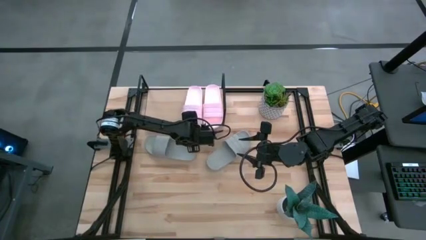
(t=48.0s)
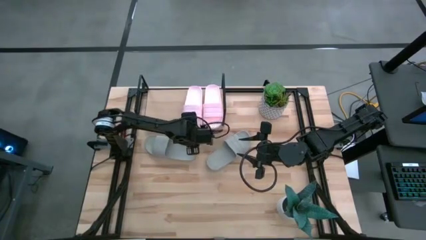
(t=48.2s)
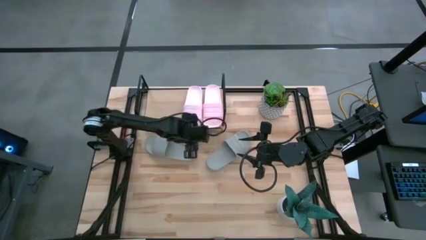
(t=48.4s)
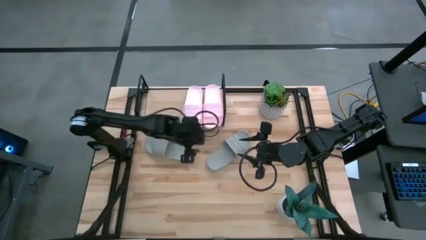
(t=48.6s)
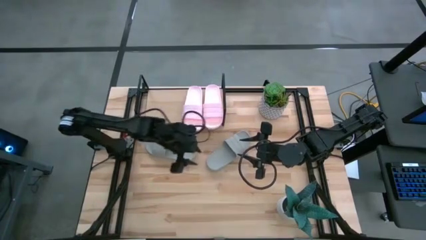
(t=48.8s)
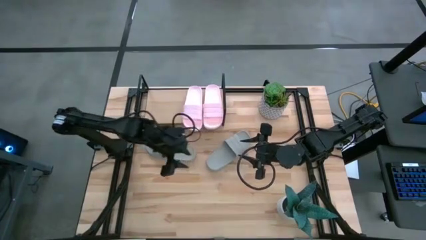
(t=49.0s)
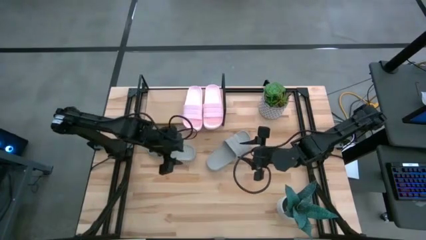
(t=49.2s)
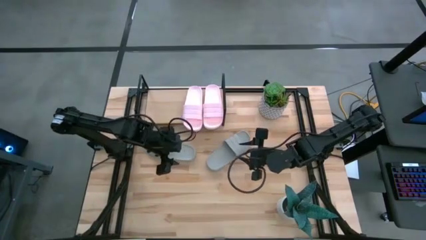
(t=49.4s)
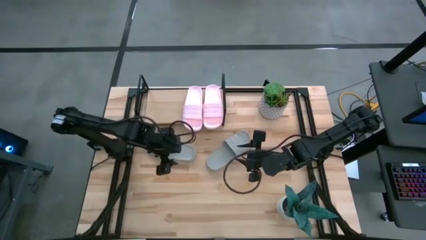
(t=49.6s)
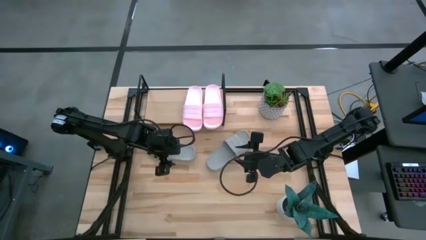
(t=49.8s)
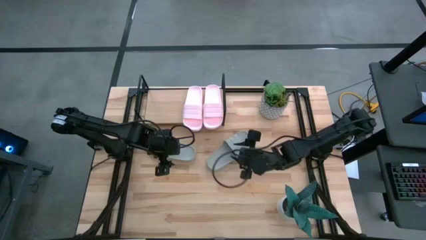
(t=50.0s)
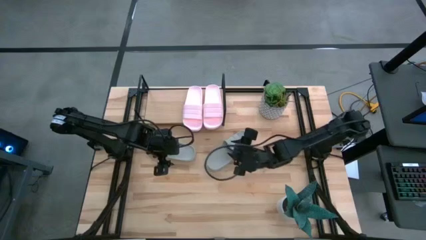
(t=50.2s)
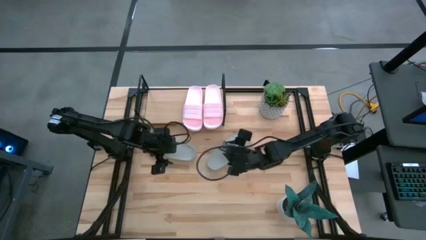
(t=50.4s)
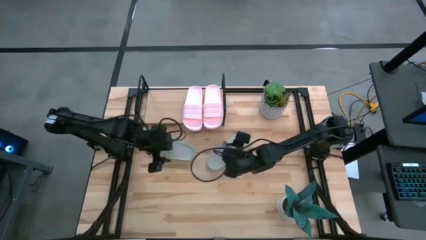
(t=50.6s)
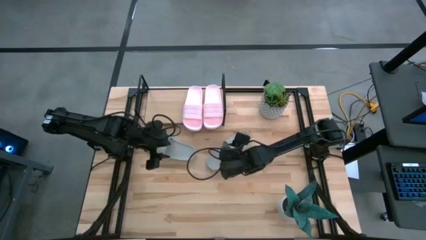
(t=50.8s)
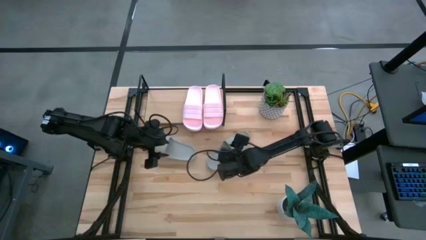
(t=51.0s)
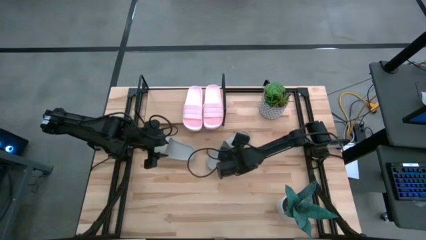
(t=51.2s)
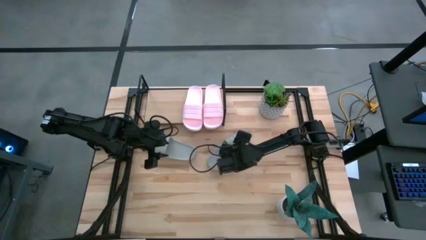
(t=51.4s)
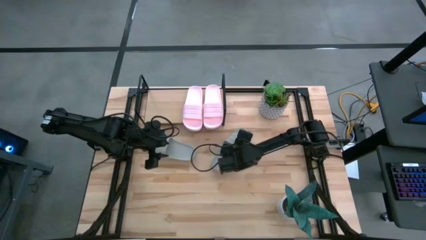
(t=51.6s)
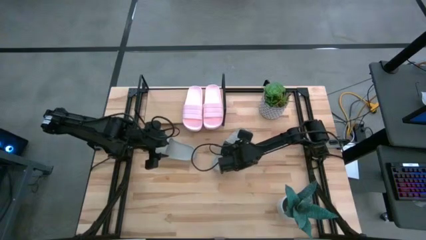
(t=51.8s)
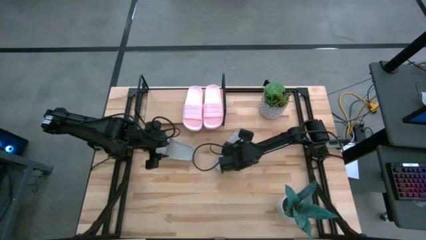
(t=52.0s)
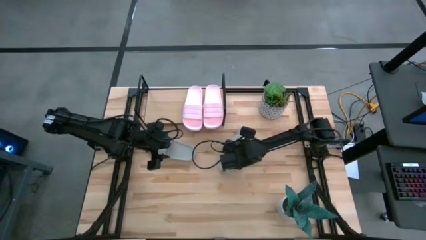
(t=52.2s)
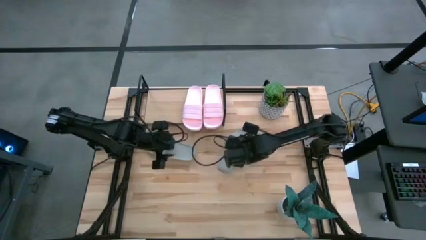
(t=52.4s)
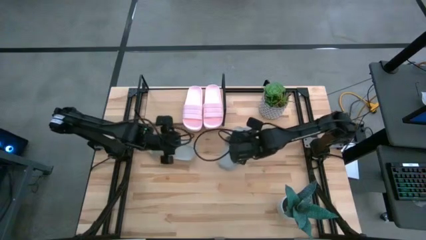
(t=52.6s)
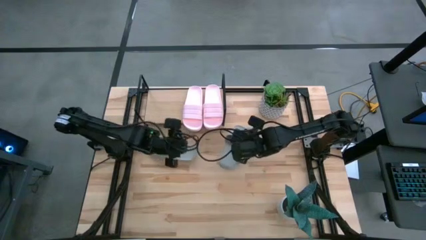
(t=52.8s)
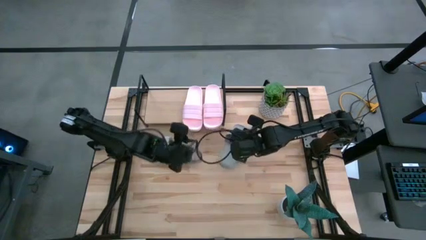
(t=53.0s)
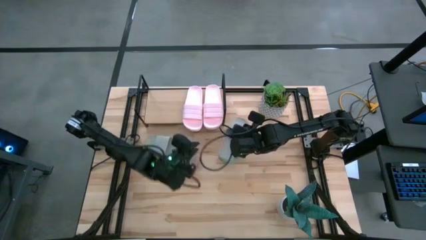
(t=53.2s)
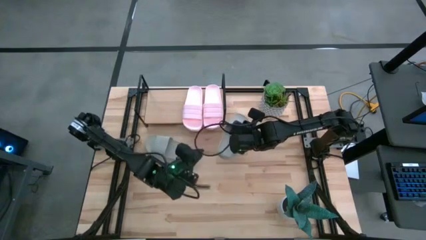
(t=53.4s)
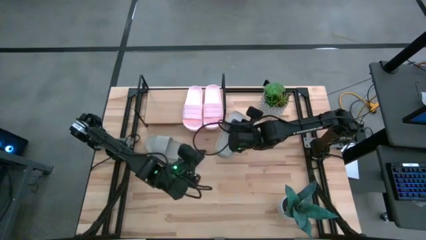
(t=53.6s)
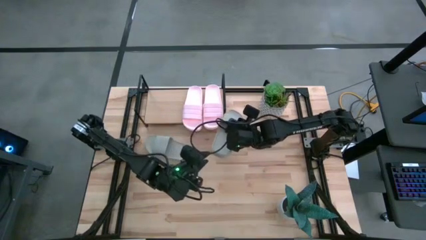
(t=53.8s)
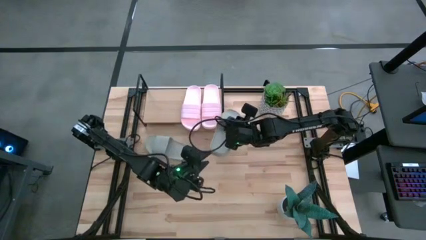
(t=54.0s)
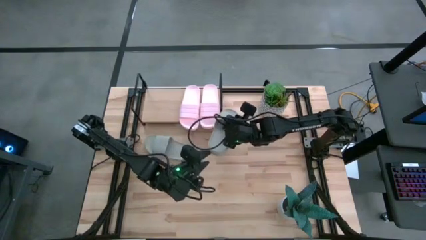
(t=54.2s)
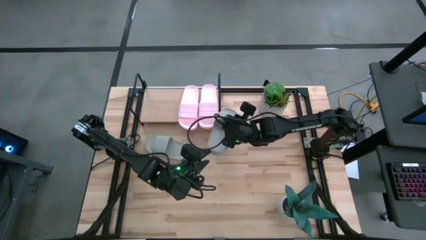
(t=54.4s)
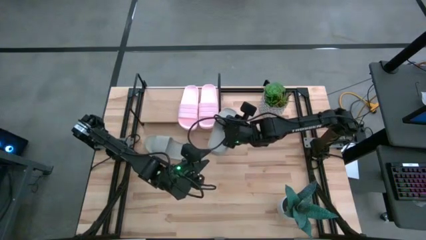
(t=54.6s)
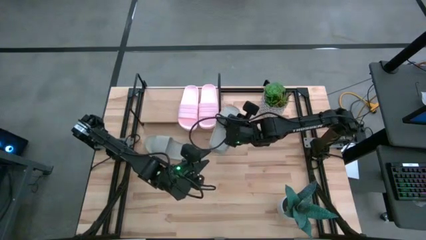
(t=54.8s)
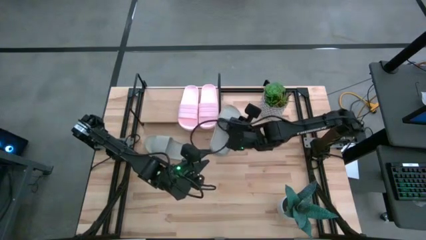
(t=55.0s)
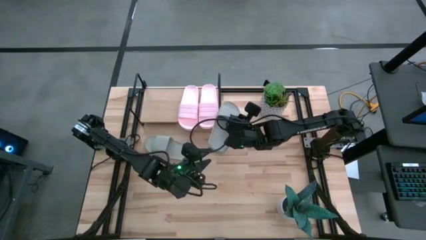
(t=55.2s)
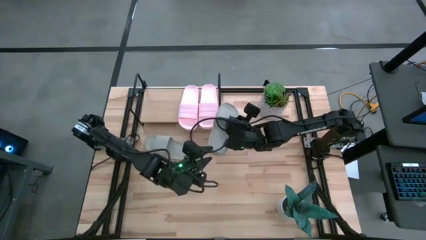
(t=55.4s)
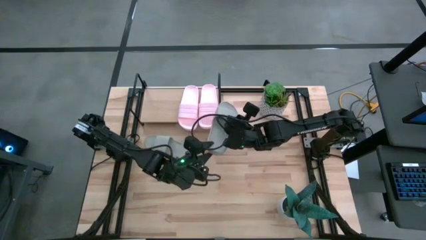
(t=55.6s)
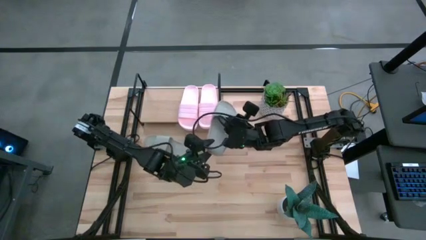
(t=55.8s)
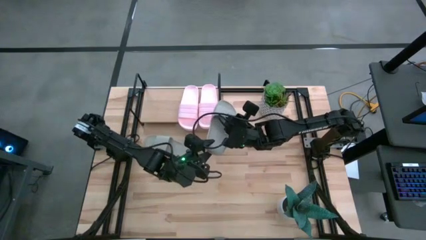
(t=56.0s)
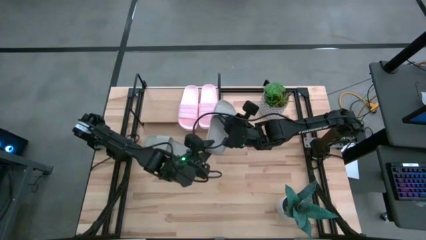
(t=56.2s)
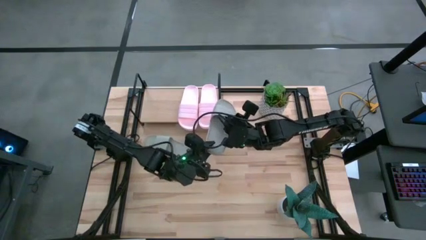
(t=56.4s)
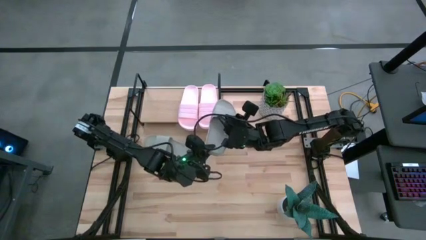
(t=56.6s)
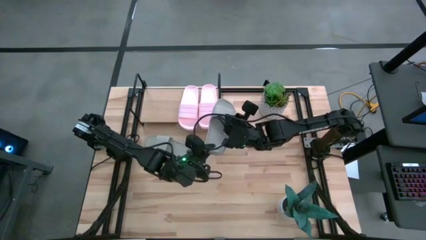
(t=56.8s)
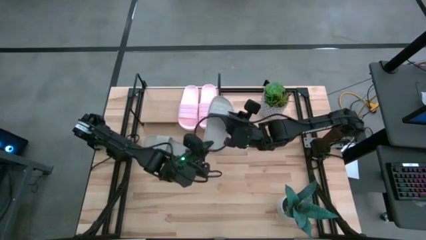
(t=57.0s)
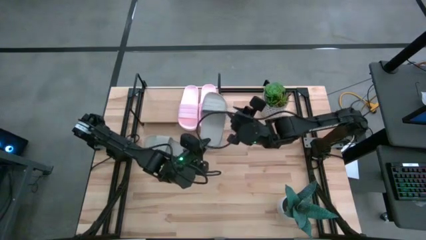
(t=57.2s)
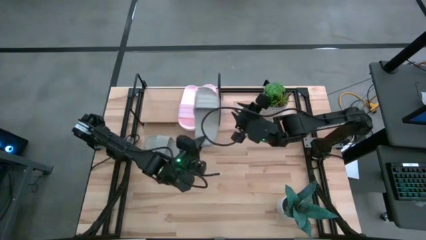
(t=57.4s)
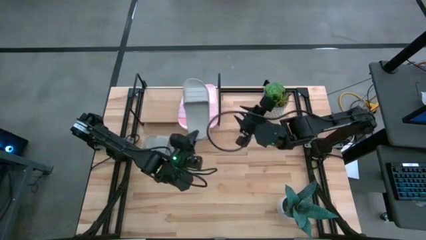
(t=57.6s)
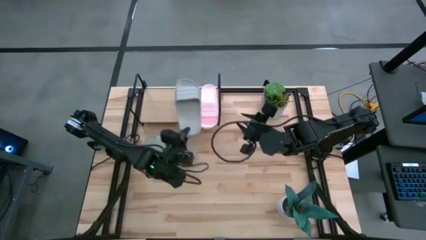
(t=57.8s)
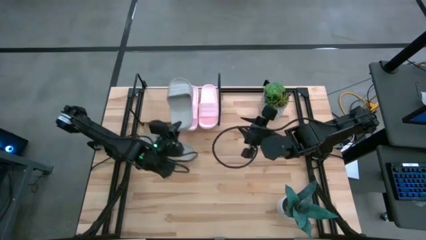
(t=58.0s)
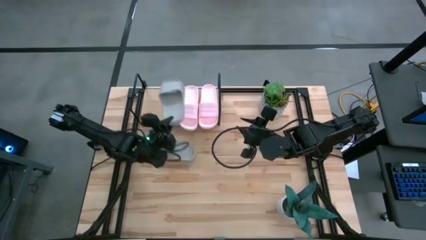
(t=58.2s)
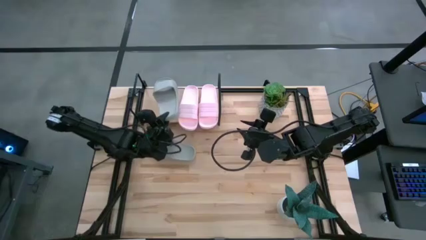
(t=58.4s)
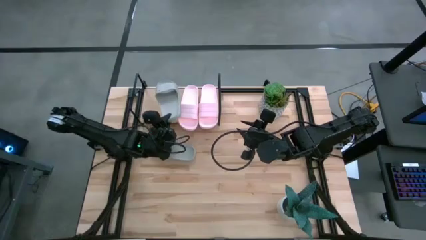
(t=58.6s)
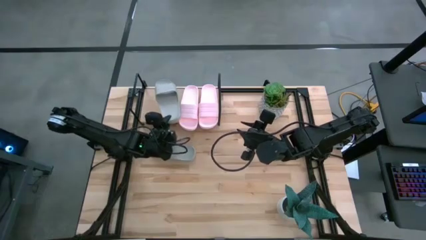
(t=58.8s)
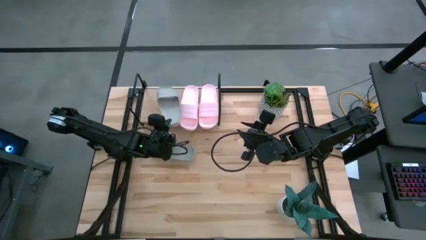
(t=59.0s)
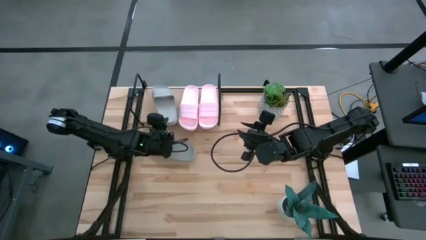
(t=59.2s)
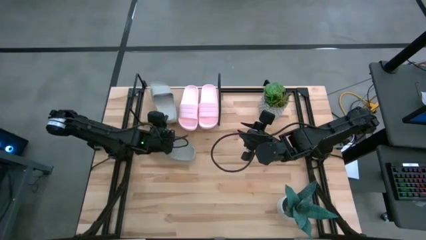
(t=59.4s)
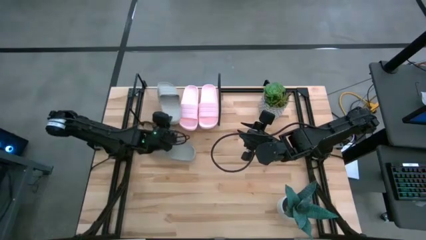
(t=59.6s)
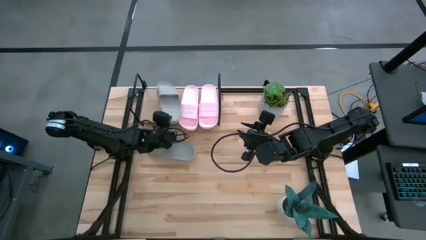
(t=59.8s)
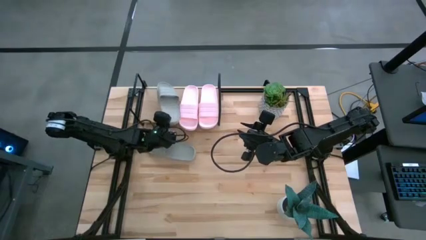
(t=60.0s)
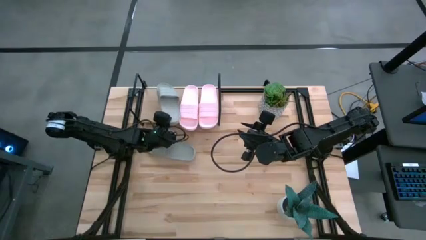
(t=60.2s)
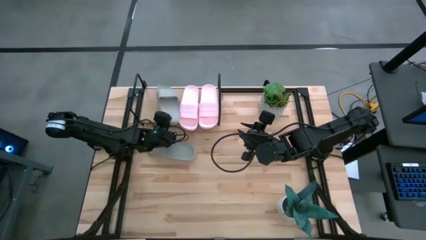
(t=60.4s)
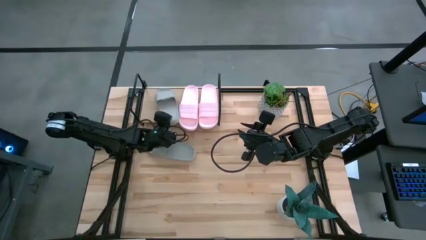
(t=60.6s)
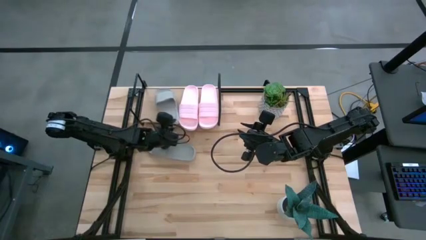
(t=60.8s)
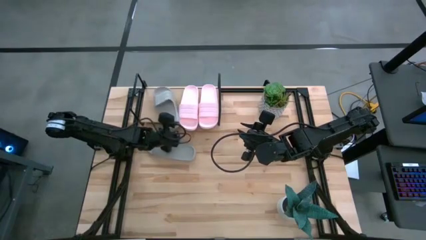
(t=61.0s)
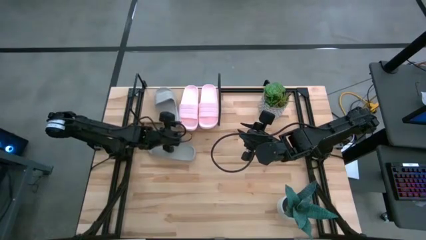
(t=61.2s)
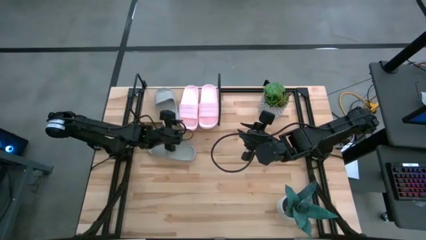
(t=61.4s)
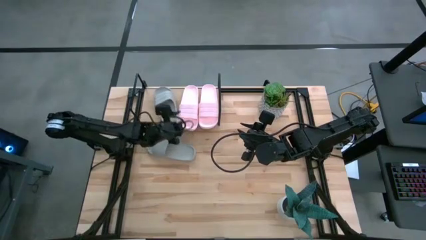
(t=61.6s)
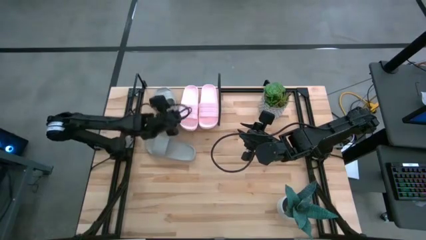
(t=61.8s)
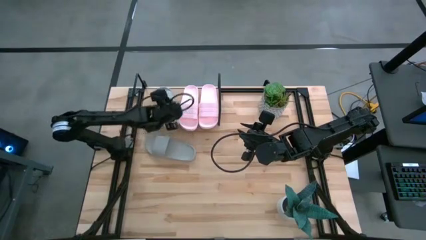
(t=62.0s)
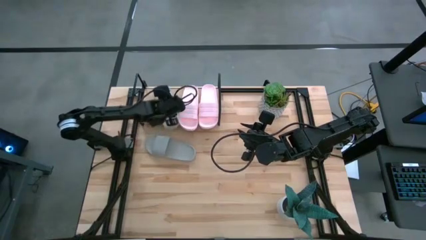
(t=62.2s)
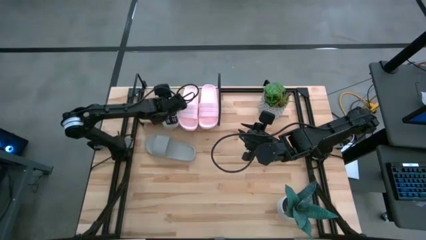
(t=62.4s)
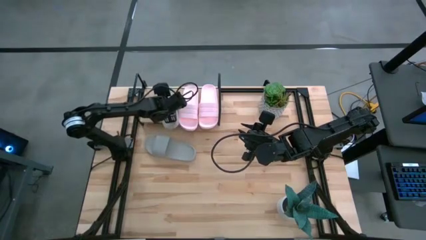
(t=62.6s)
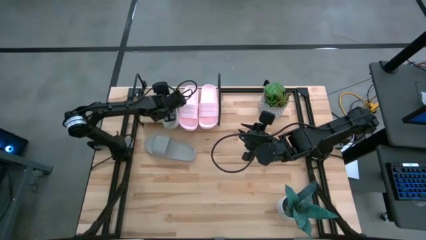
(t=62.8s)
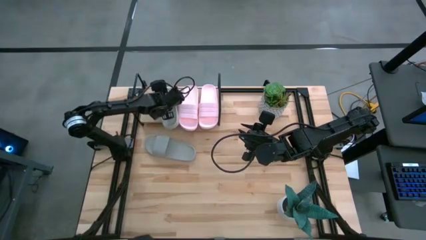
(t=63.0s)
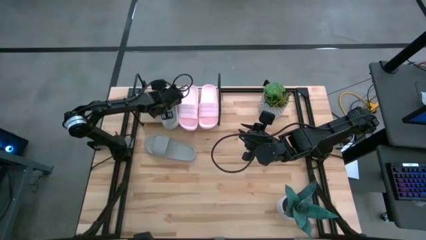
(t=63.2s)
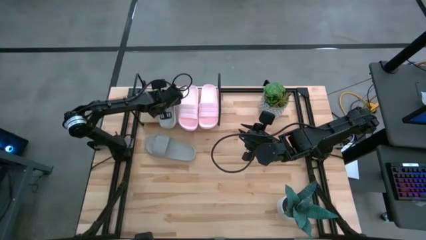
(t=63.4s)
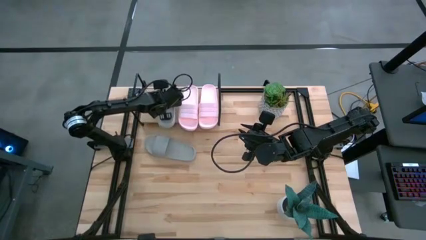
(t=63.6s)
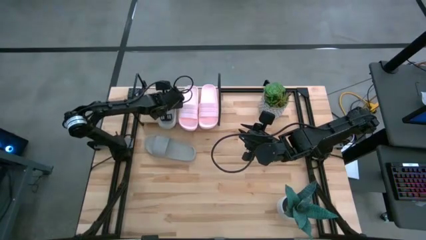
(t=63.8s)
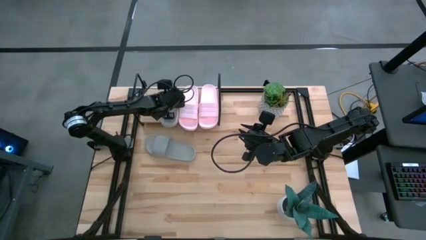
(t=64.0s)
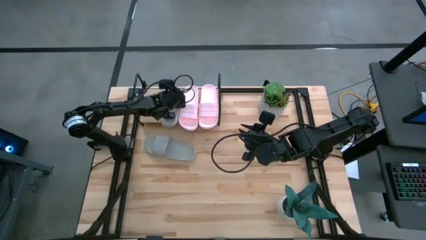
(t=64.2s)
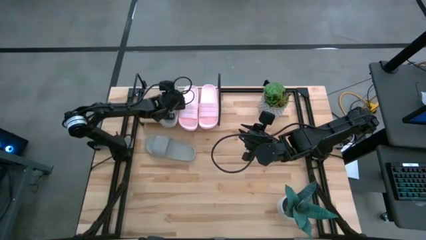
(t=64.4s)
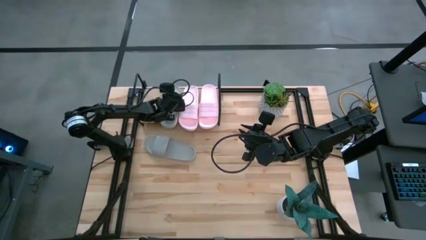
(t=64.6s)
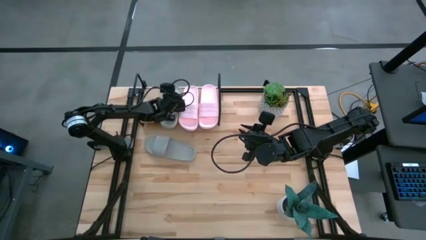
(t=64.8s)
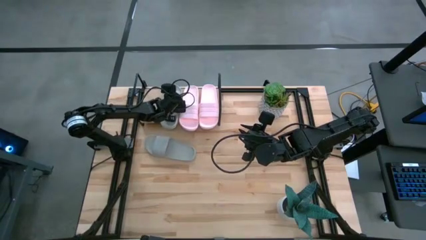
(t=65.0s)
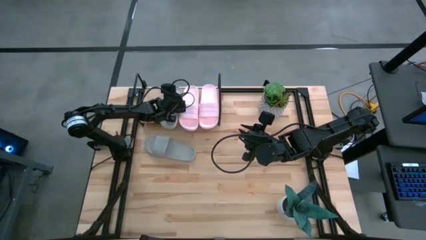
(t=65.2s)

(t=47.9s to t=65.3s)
Task: Pick and place slides into the shelf
Put the right gray slipper on the shelf
